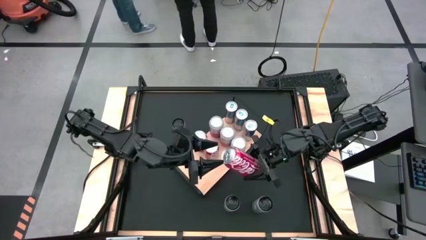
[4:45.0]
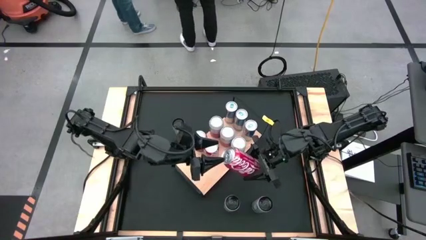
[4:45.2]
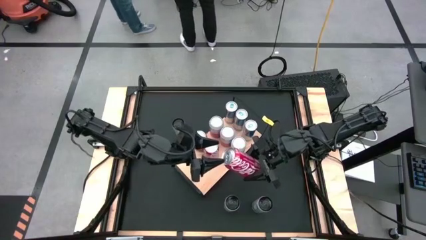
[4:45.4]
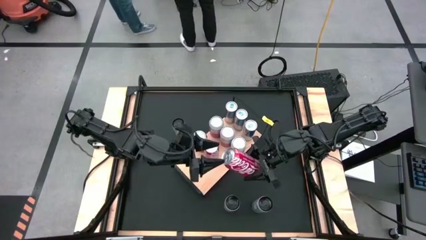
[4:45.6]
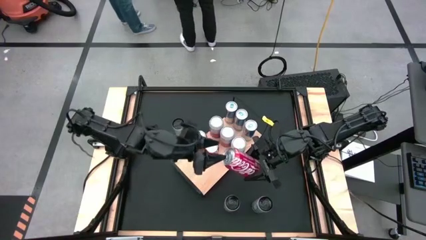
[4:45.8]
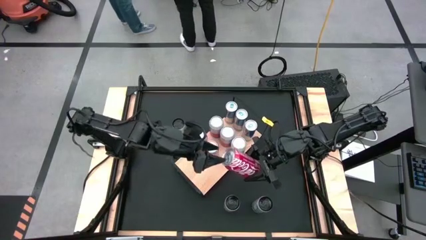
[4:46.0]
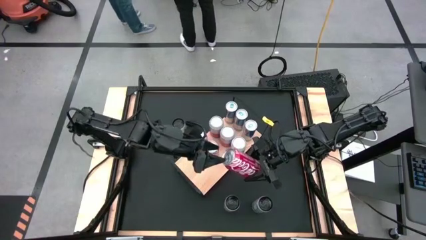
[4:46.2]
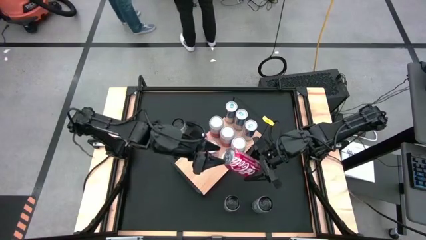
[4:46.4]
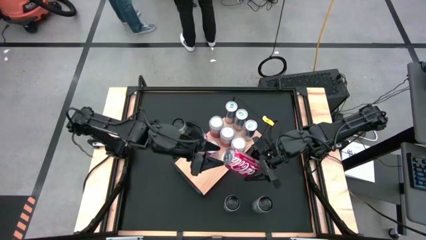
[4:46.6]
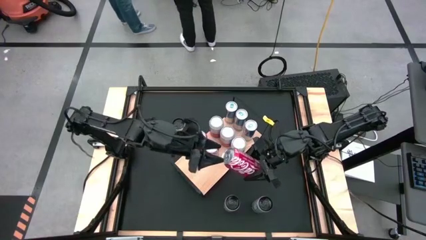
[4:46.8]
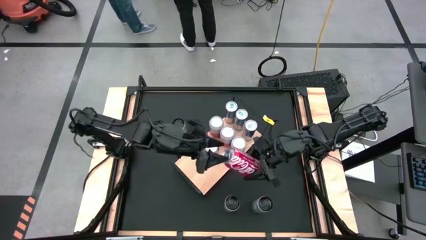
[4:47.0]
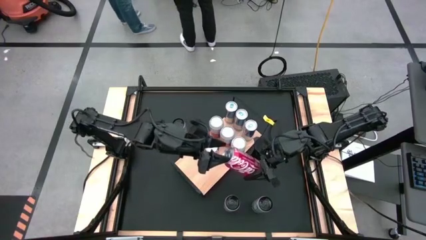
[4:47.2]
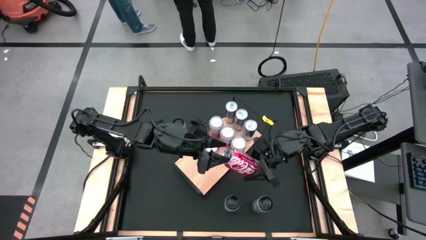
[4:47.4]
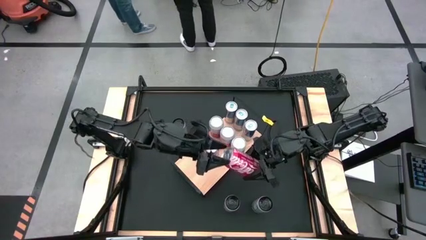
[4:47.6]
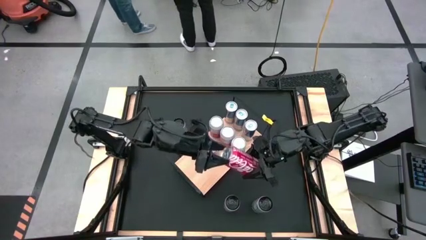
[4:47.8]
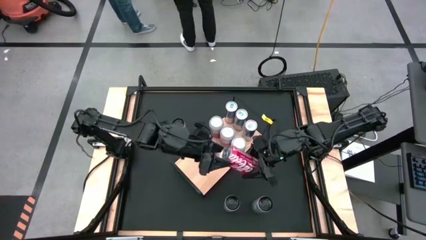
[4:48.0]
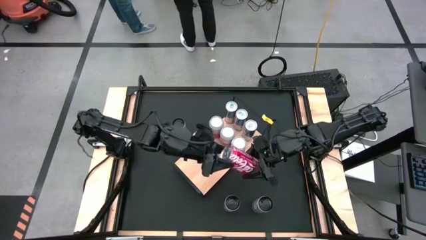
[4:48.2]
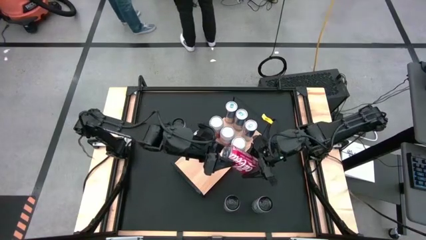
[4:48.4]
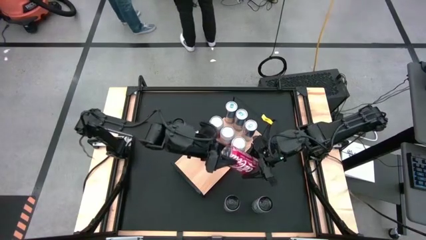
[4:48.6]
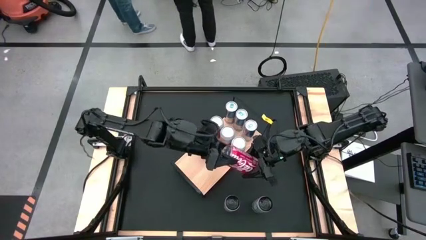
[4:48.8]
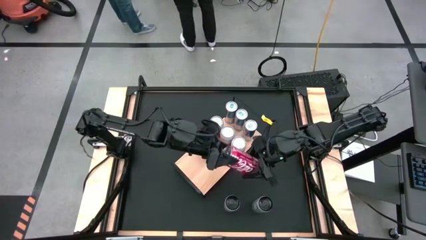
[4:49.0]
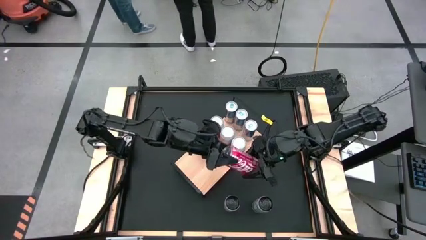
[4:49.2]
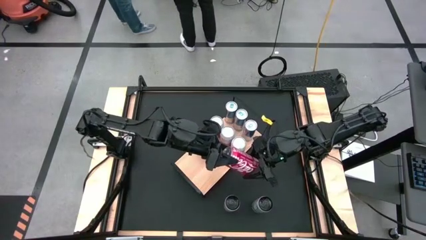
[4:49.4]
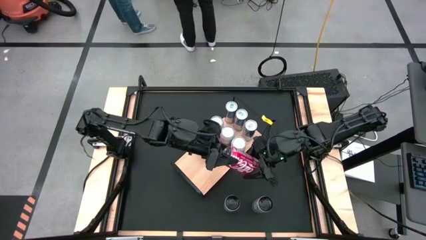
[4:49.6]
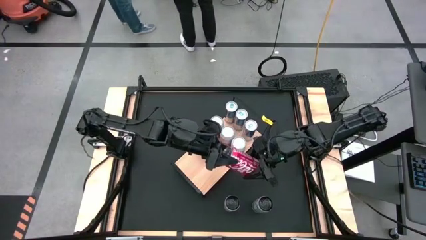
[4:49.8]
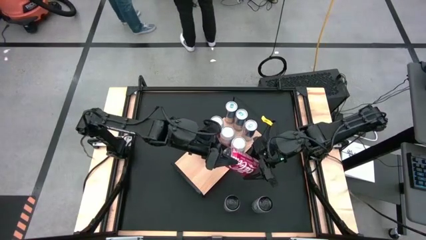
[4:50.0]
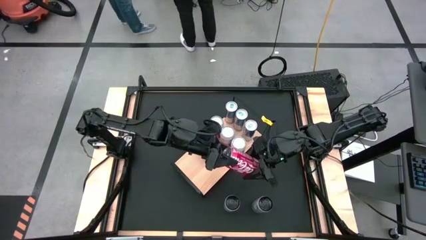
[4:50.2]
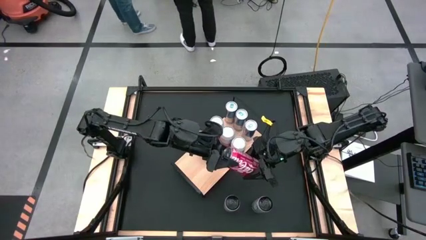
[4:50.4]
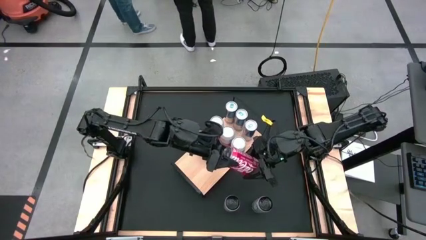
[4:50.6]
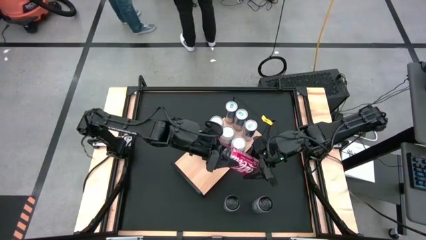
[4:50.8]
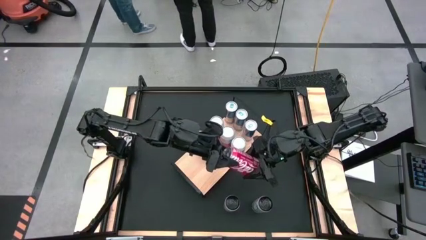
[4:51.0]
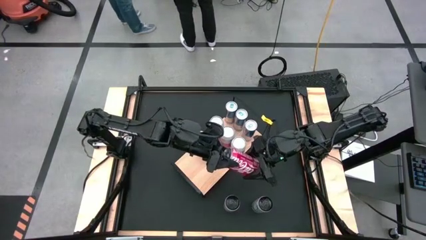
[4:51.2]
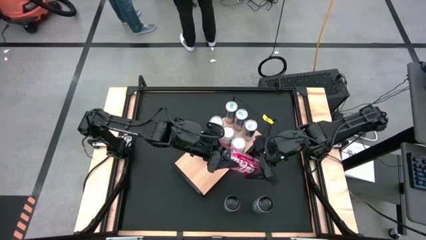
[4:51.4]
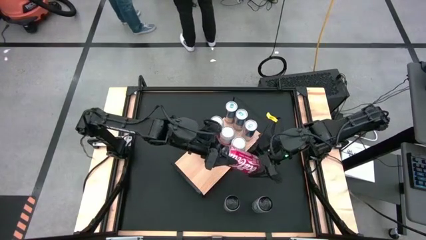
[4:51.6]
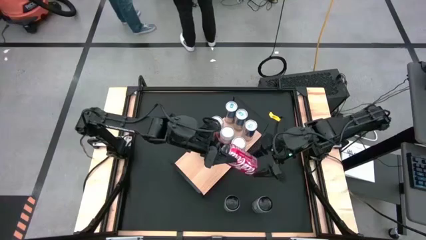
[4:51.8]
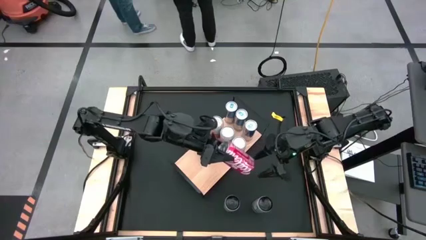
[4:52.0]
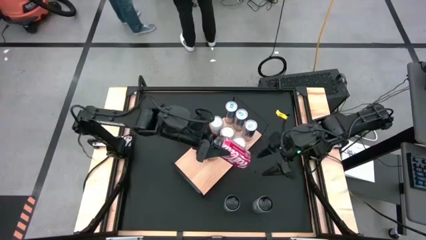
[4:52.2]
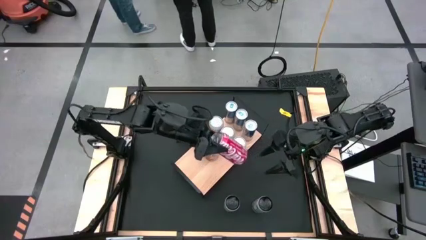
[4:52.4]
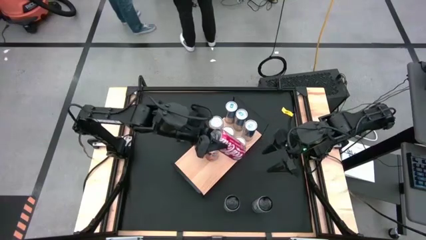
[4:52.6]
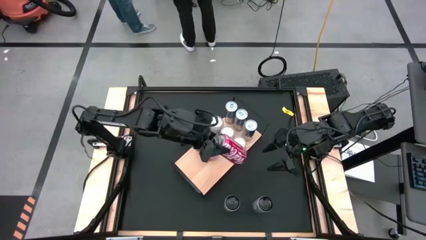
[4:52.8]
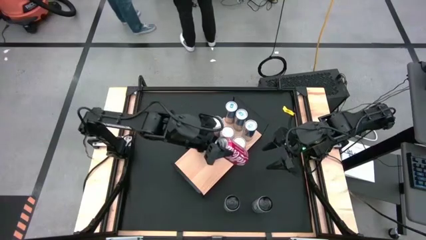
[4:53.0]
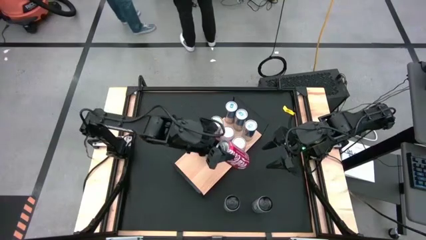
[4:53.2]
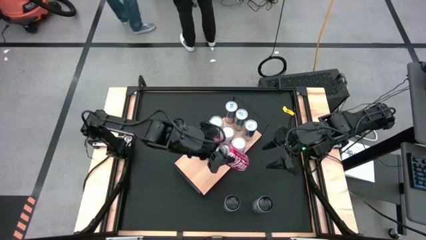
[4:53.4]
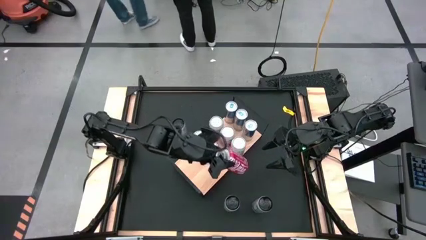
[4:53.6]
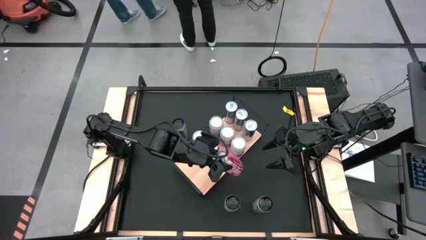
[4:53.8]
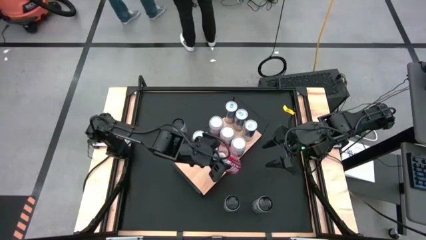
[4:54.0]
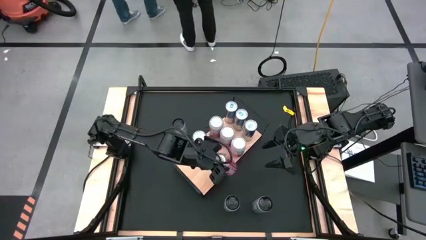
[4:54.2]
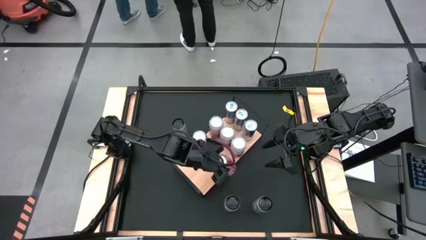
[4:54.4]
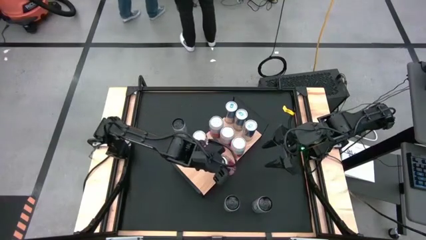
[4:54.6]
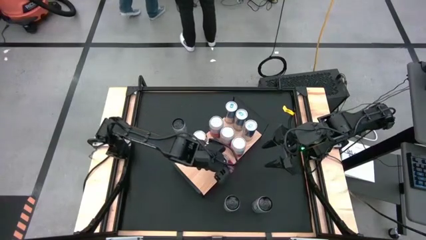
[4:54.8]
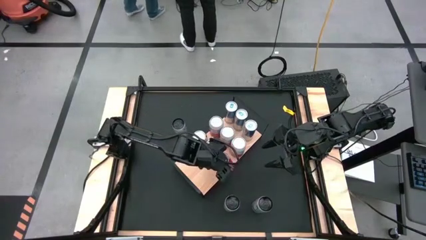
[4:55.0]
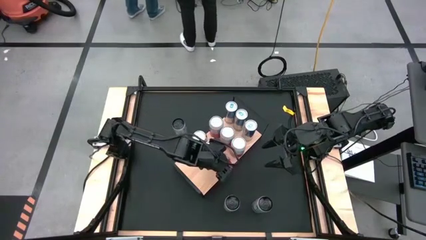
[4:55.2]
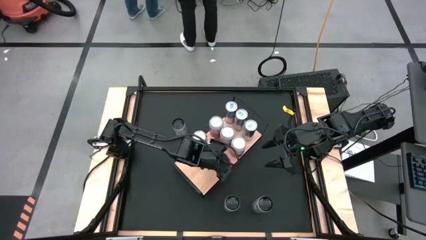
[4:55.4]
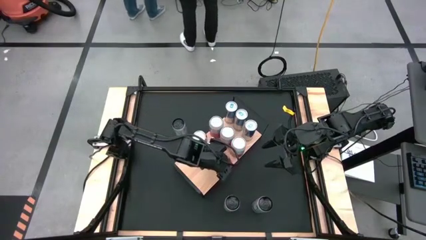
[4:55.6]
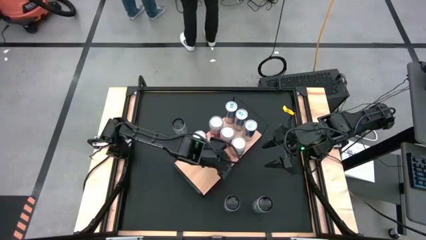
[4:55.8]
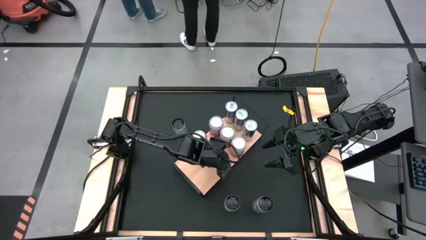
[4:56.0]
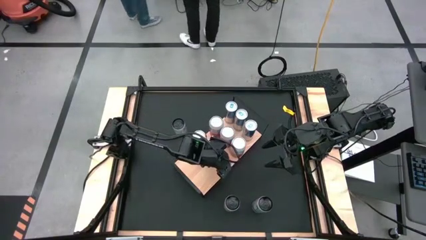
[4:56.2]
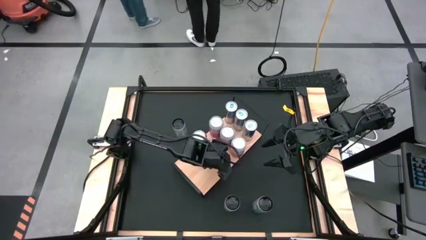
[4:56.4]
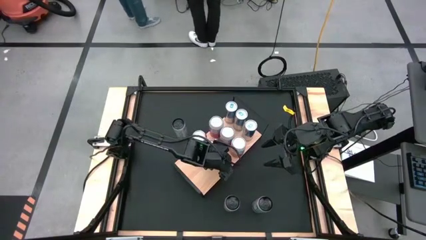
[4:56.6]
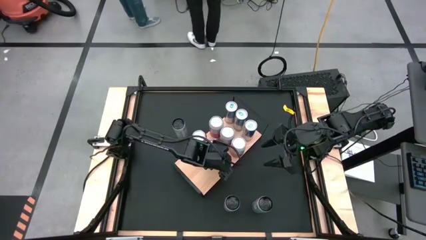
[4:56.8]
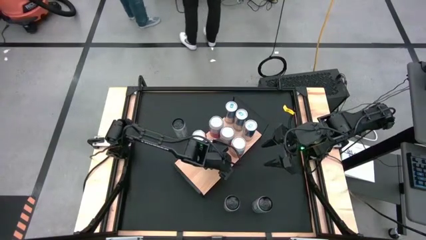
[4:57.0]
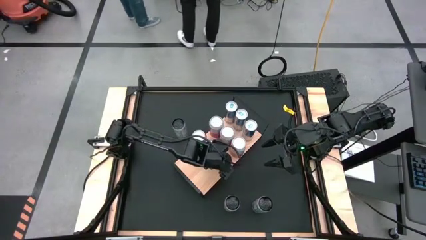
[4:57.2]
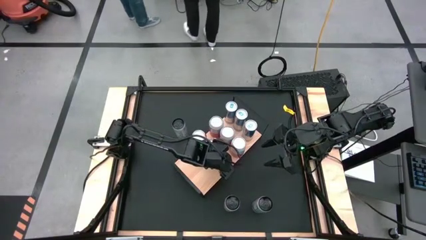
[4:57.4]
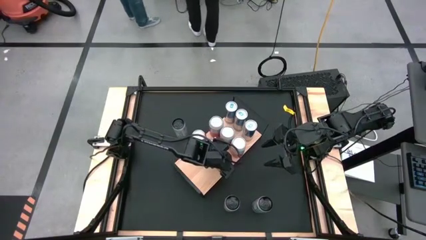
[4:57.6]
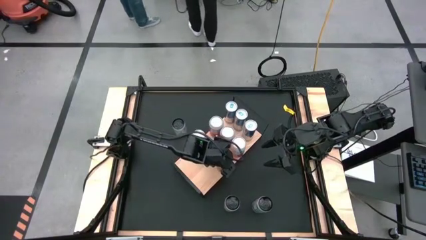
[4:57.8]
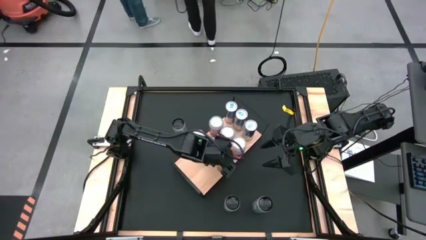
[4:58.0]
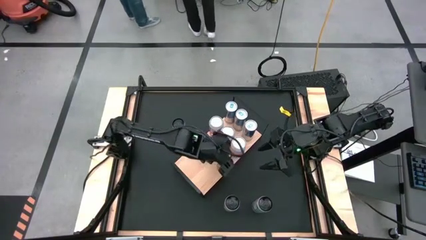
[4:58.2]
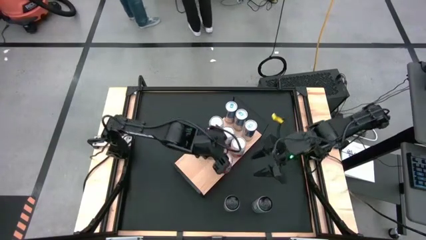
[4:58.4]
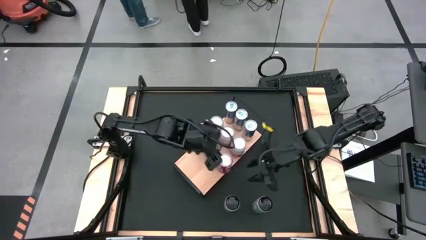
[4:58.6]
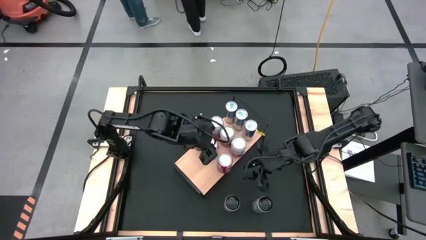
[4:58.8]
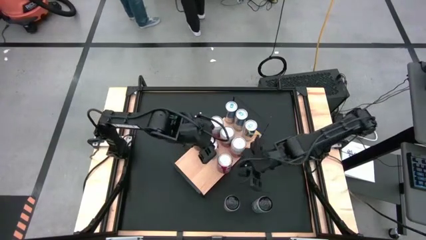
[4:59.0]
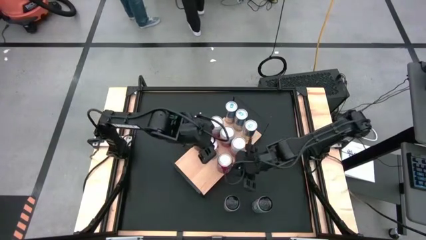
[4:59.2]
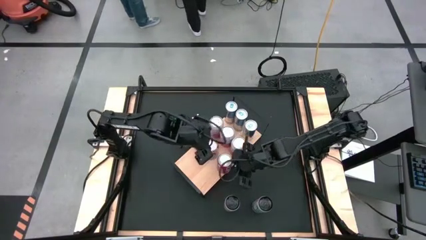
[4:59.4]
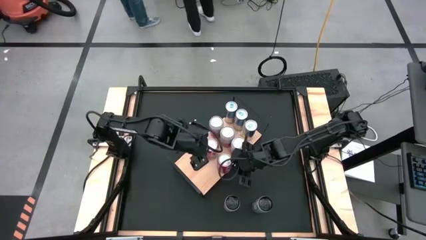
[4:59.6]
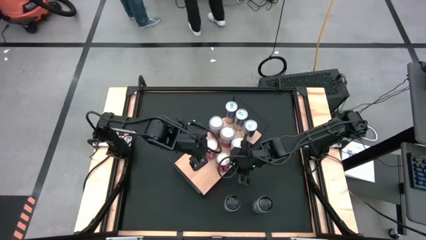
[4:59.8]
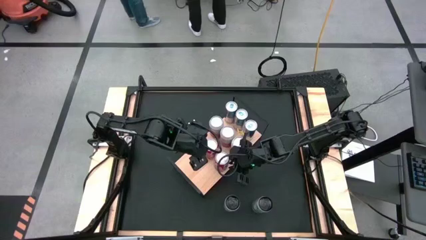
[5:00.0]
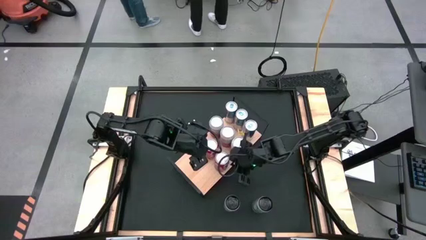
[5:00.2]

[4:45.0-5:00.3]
Task: Place canned beverage on shelf
Put the red white soda can on the shelf aligned with the other red white soda cans
